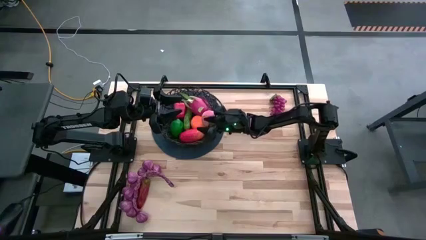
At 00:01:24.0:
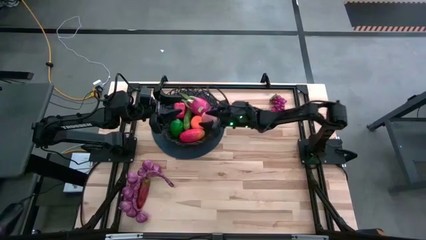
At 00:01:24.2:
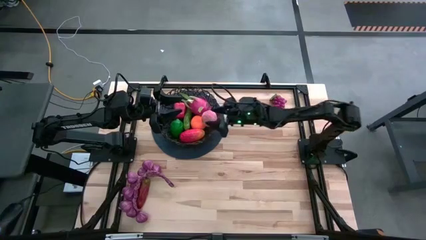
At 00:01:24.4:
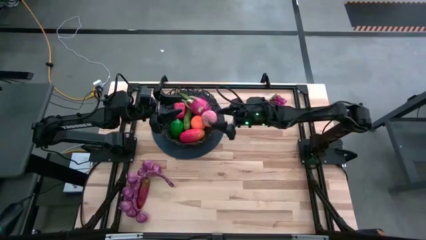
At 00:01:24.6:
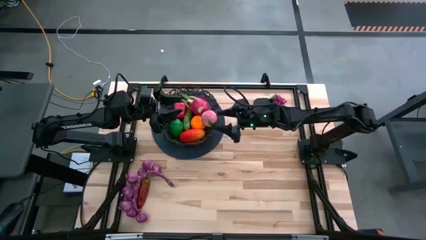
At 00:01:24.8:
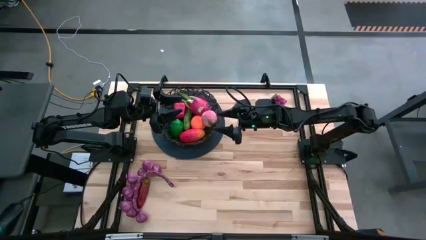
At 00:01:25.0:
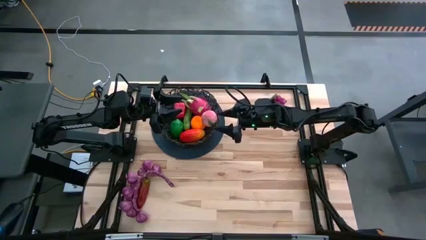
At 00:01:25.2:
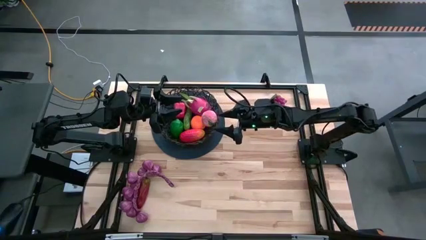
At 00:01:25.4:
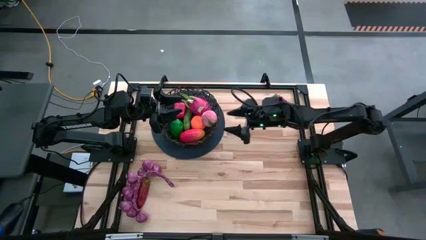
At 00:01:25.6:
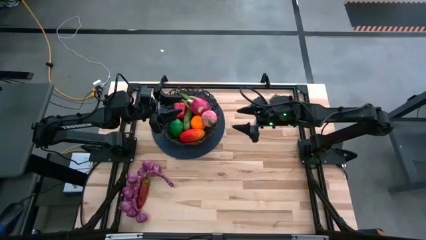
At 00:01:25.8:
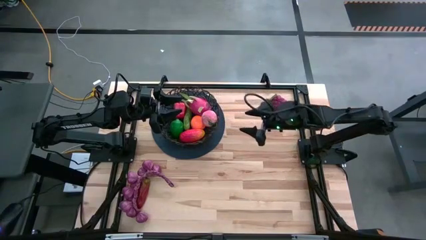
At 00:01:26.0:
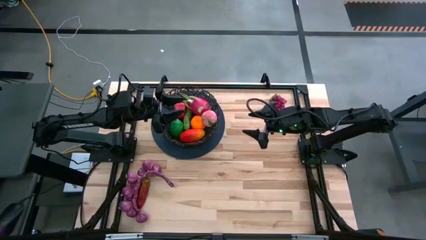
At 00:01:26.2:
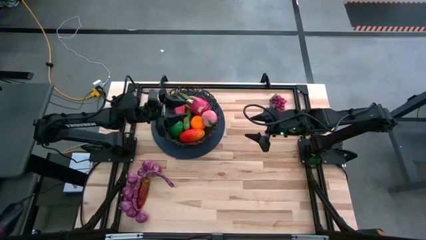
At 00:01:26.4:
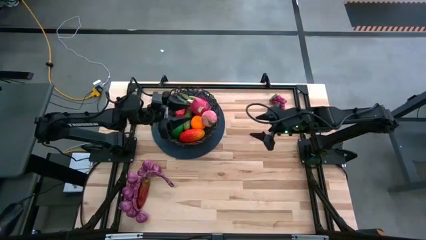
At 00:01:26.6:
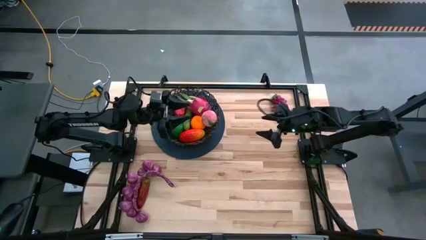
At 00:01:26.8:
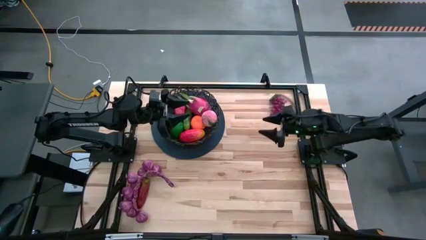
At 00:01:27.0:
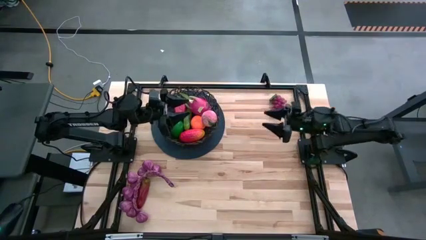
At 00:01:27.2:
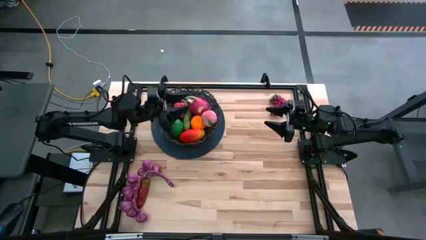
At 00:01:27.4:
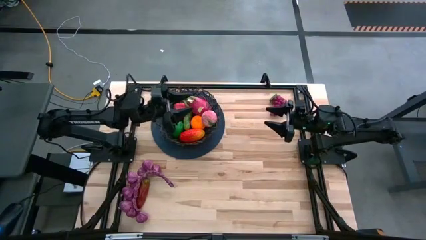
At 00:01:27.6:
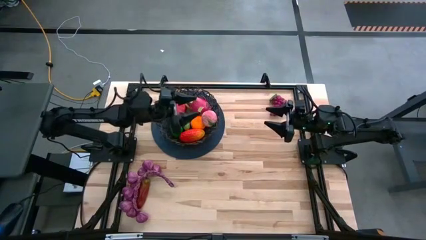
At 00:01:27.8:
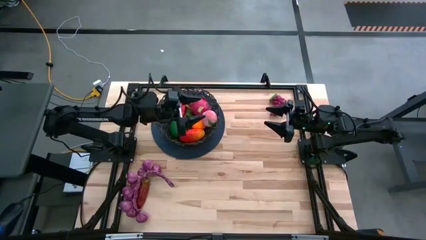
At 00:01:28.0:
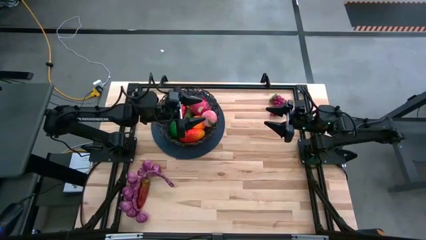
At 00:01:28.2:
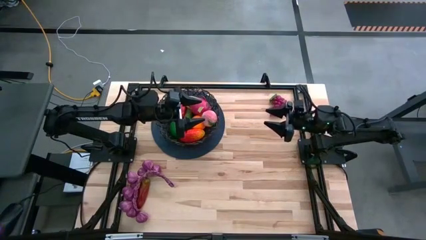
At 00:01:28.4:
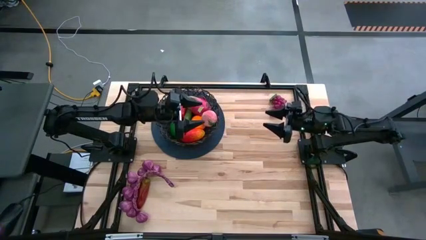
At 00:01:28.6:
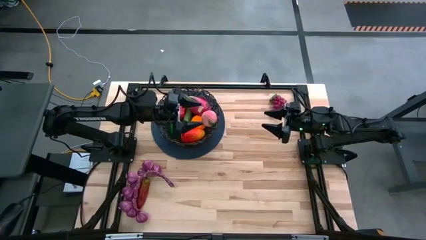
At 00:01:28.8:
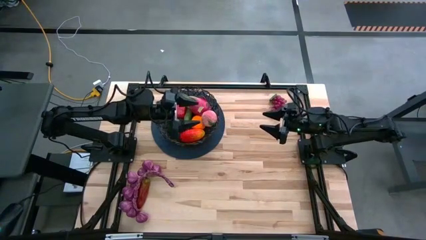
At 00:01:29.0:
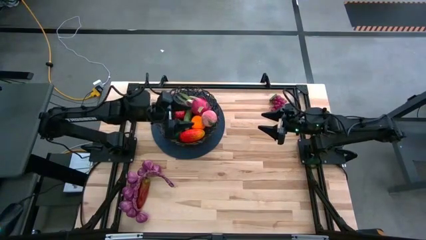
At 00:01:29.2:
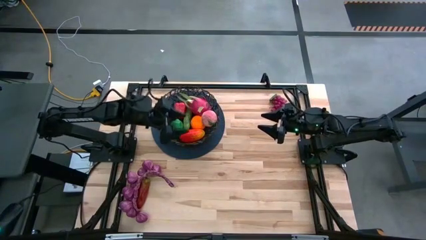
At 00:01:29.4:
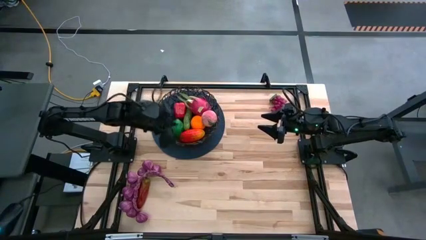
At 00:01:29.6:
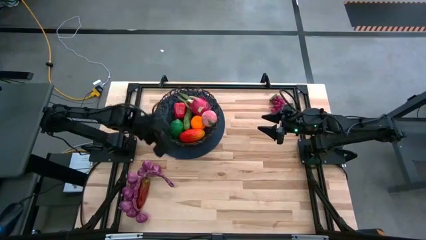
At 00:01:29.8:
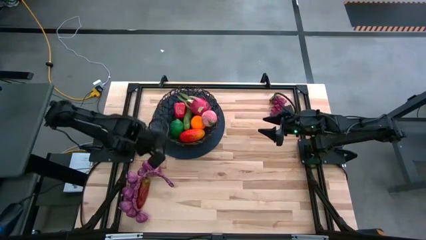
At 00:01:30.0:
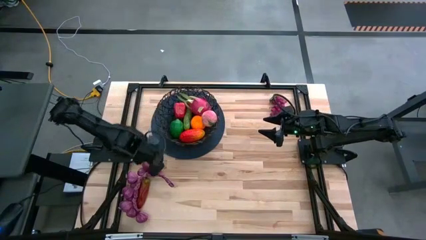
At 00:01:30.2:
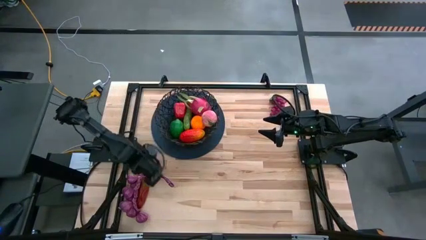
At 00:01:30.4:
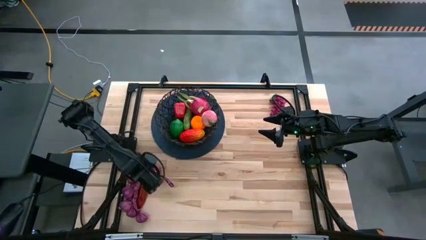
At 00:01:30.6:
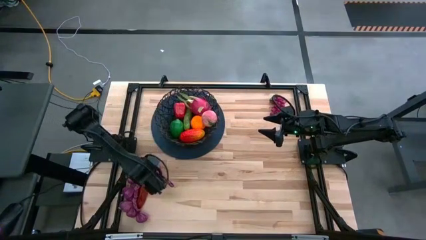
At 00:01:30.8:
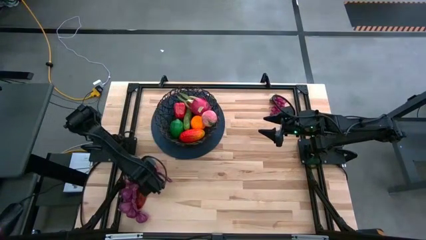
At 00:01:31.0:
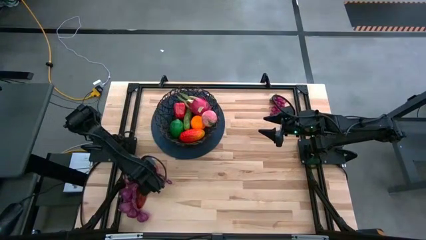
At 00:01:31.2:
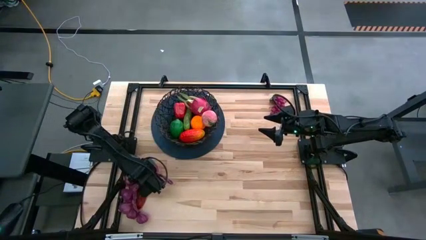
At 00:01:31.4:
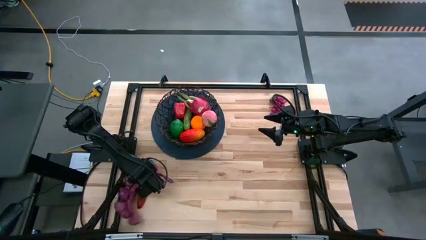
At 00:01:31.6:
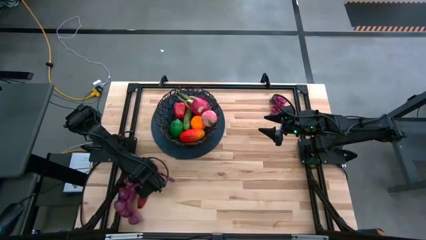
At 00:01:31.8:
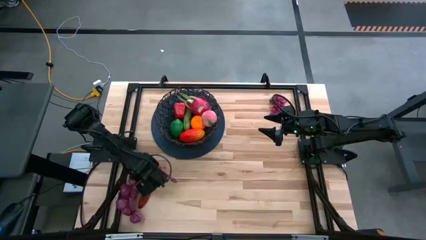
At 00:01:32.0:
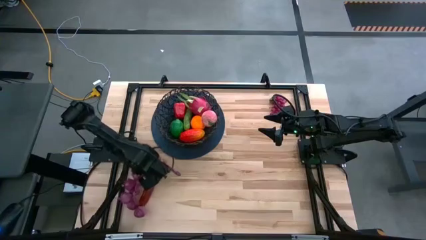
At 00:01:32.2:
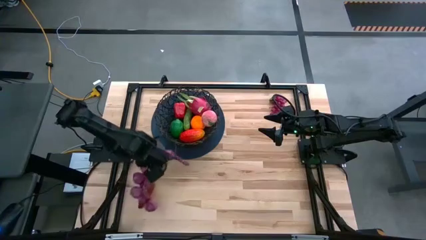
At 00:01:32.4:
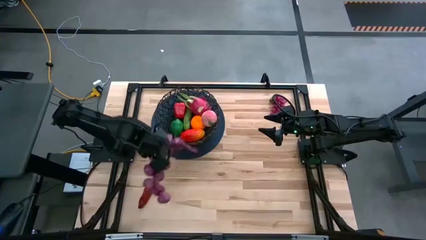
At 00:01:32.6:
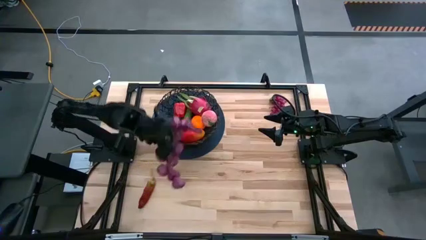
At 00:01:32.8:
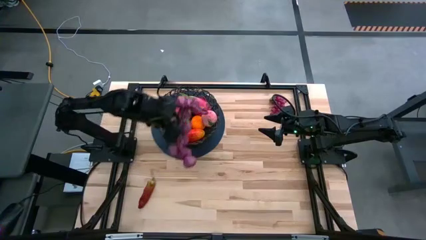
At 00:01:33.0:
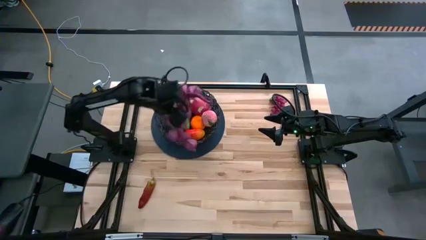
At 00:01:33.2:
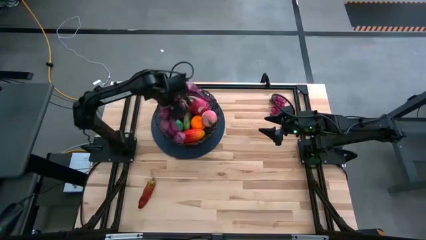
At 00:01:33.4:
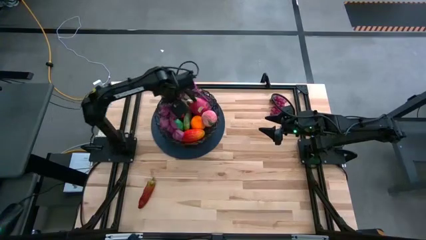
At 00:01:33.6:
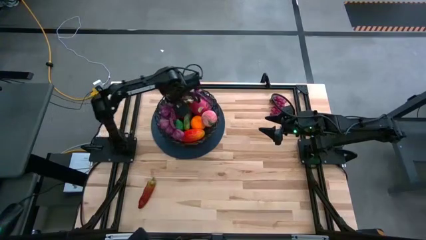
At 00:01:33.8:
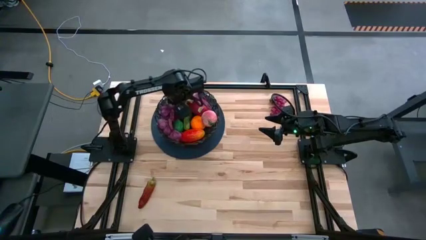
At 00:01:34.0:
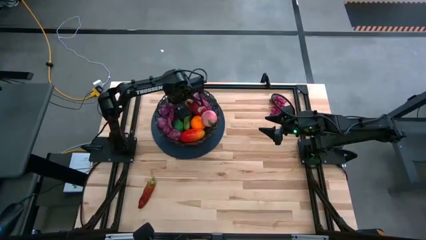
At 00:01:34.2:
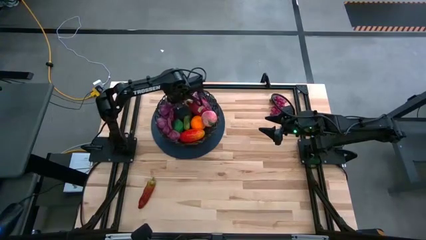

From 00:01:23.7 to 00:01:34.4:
Task: Build produce basket
Put the purple garlic into the black wire basket

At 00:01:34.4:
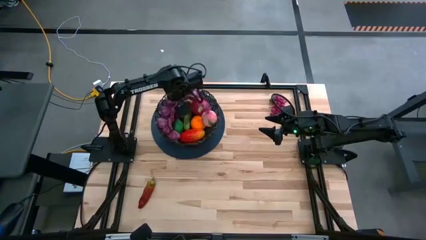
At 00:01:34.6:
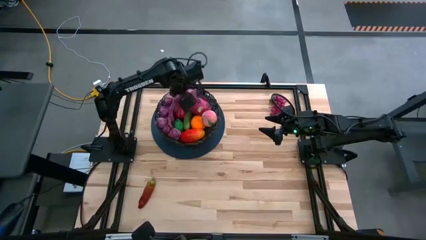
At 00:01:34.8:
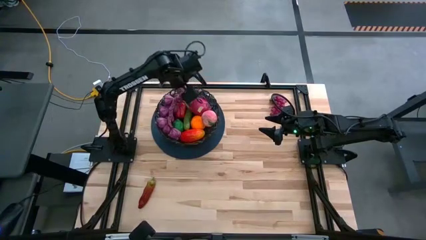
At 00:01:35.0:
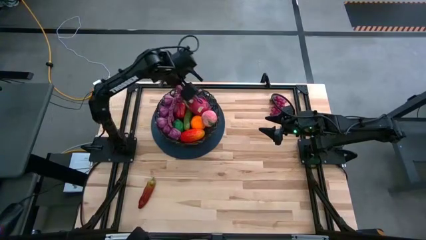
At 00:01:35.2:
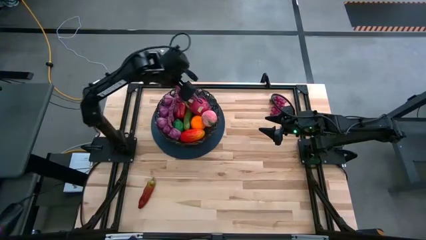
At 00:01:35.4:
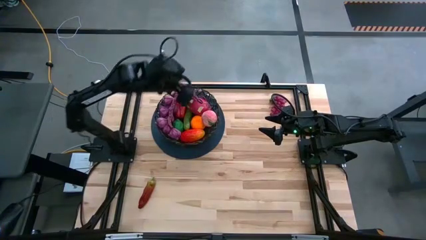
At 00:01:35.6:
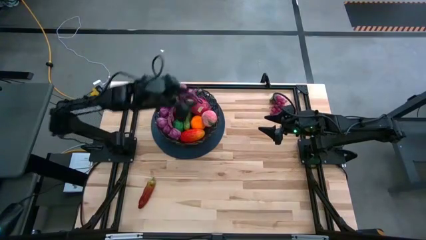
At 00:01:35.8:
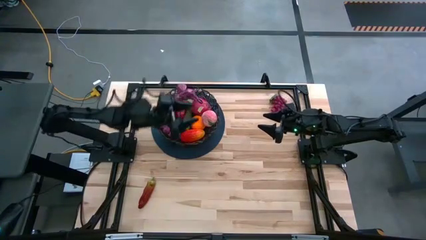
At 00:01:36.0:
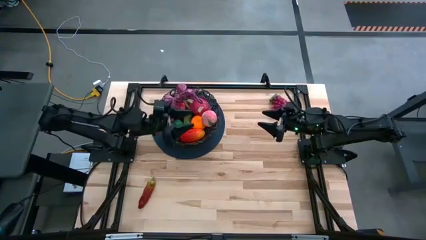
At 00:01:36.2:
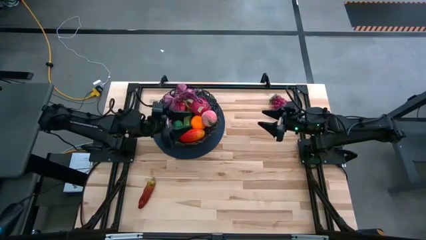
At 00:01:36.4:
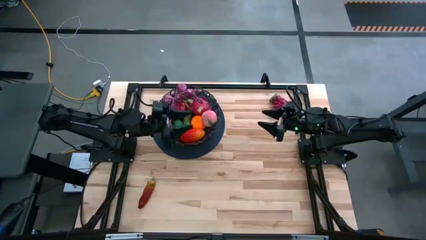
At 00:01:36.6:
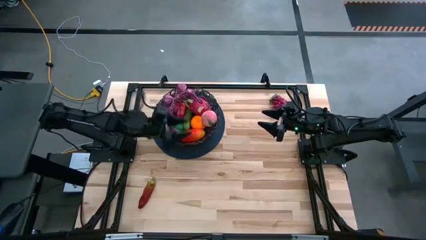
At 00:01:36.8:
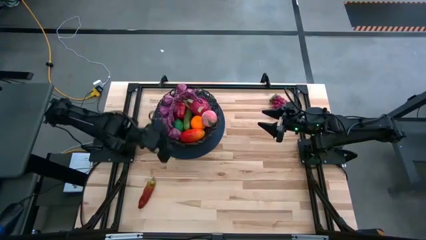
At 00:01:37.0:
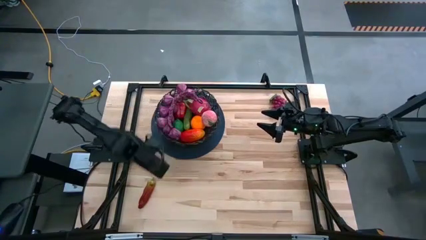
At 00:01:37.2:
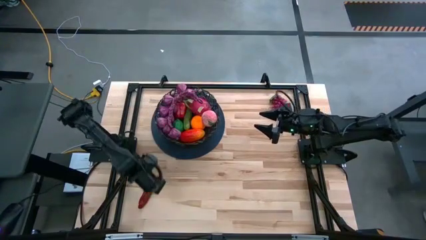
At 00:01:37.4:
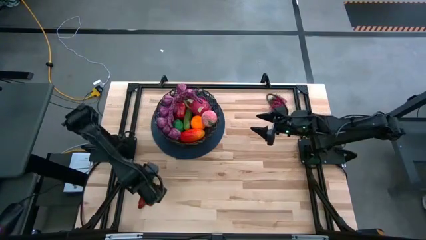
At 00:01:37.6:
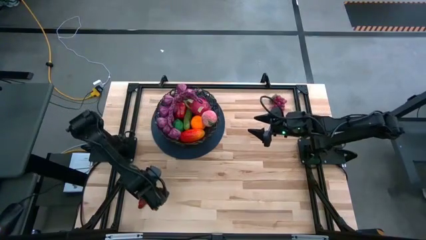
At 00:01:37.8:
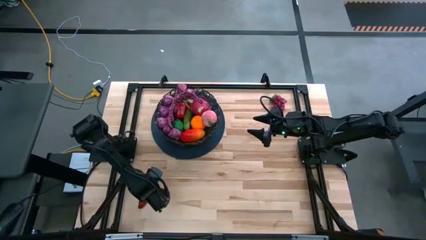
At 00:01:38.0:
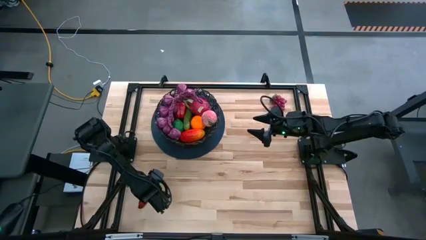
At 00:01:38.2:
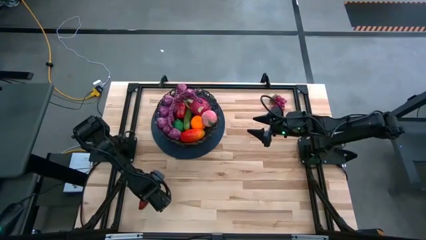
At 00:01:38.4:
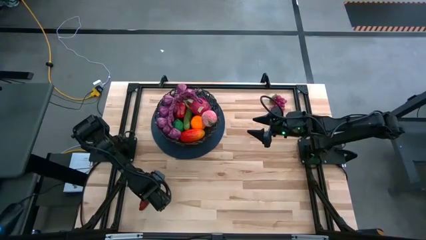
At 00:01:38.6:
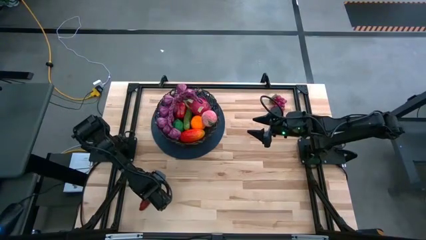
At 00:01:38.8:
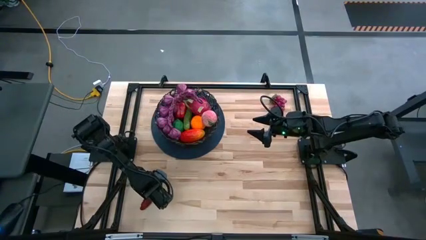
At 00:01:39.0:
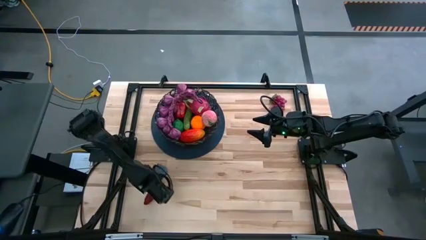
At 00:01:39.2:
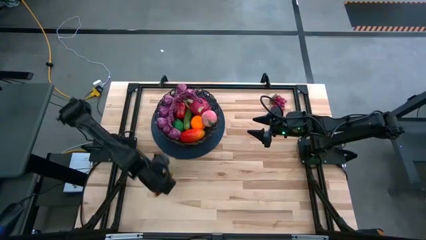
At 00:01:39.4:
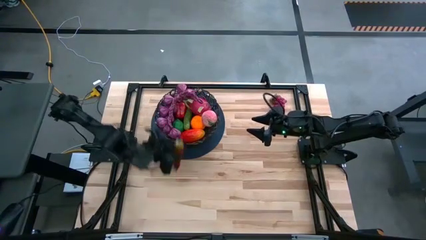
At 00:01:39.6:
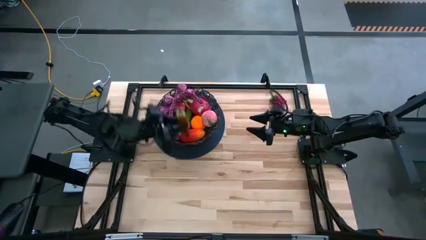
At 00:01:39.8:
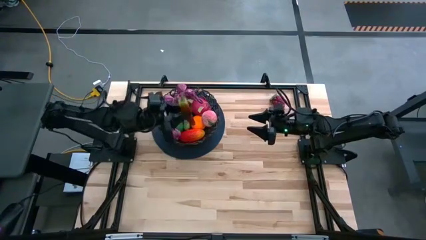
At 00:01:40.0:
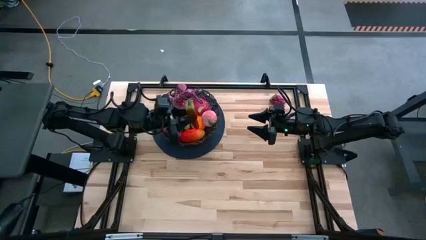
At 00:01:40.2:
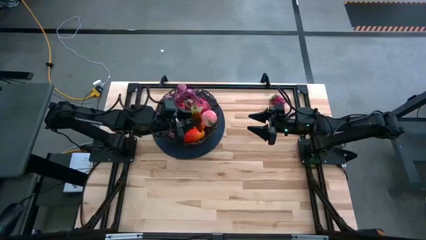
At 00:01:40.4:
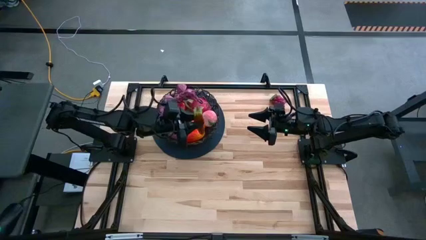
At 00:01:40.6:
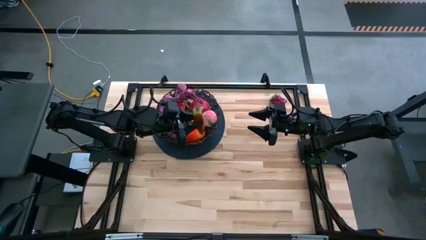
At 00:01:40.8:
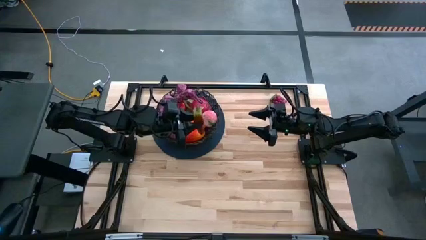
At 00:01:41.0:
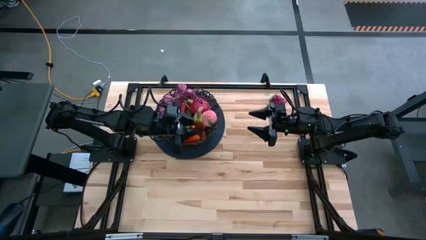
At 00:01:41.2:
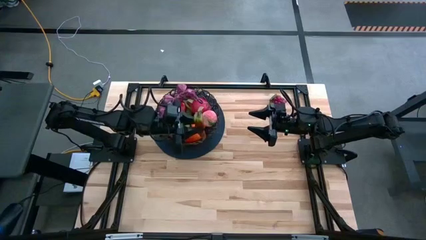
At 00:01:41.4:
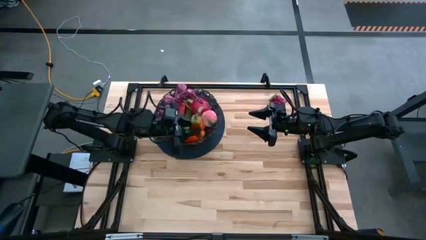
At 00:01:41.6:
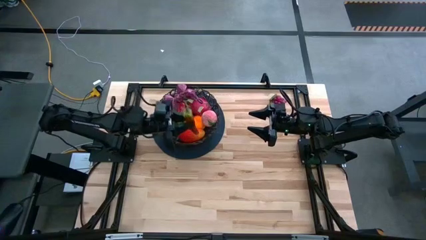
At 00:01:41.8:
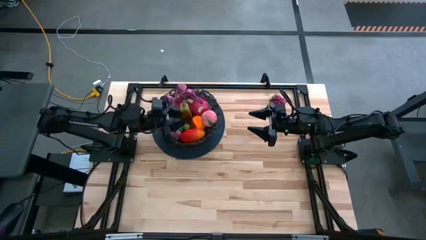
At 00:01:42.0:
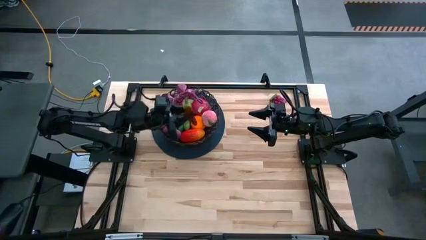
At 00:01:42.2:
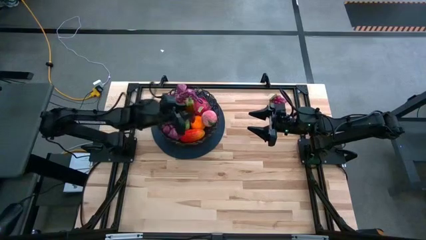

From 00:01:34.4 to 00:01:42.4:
Put the red chili pepper into the black wire basket
